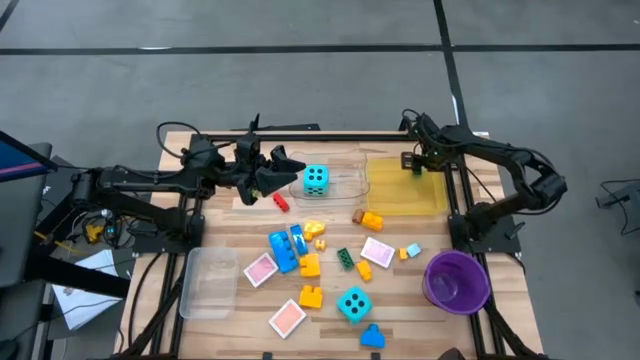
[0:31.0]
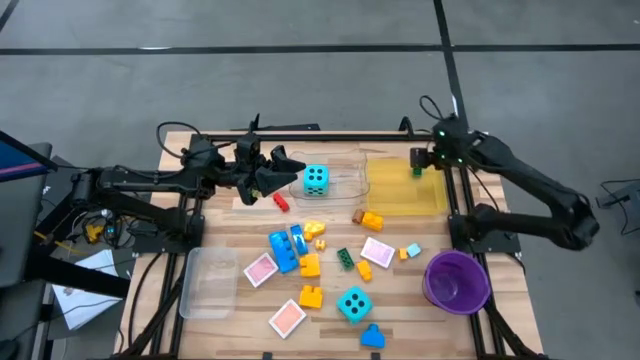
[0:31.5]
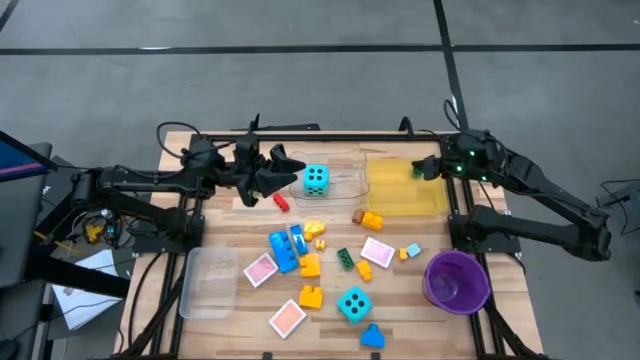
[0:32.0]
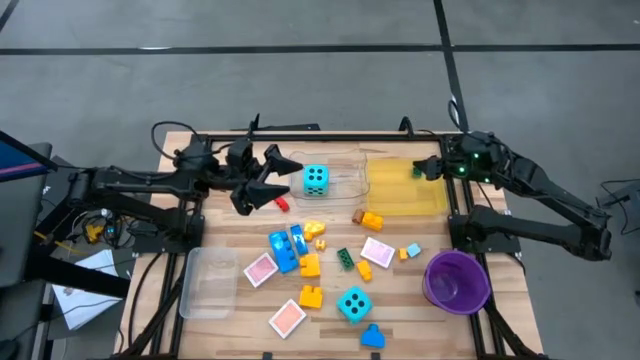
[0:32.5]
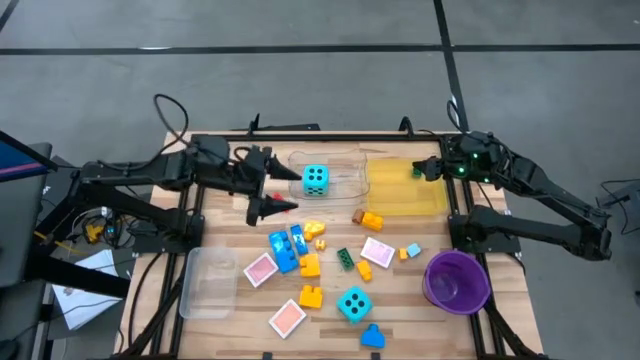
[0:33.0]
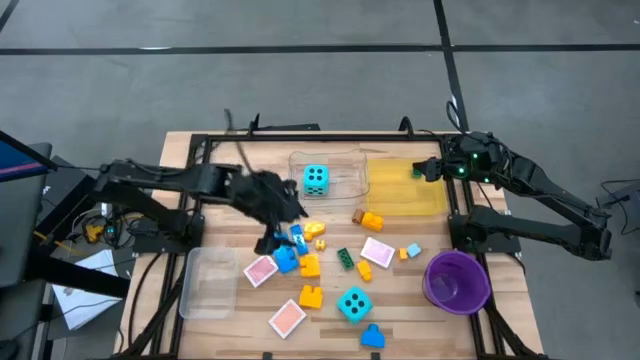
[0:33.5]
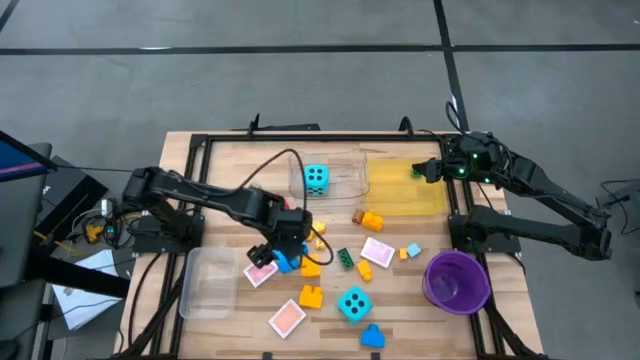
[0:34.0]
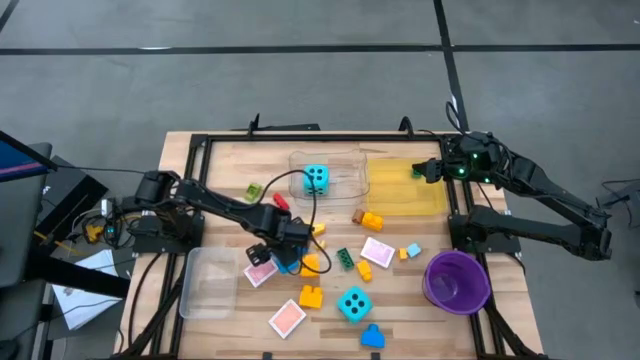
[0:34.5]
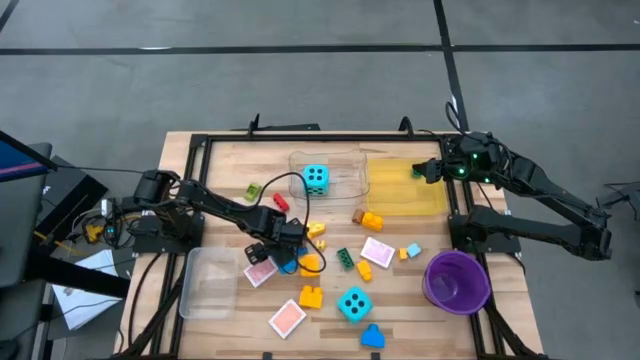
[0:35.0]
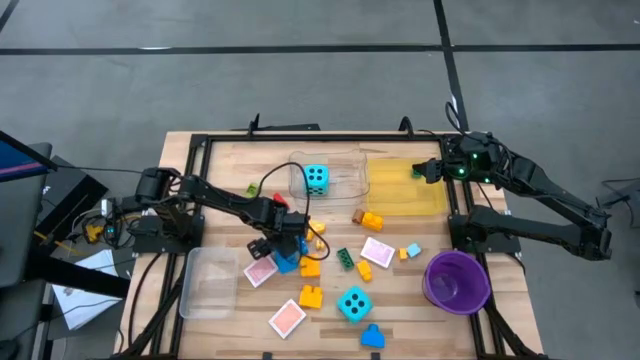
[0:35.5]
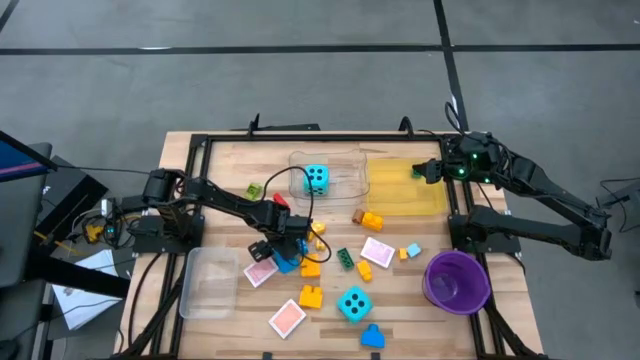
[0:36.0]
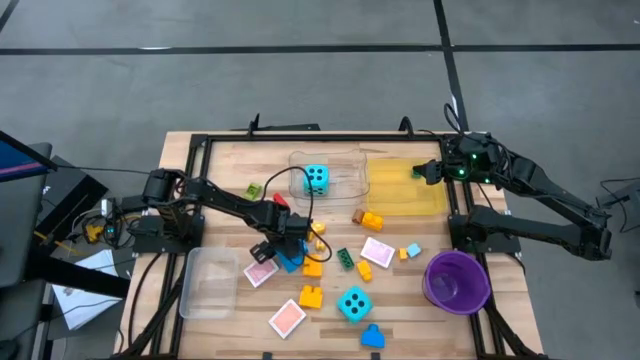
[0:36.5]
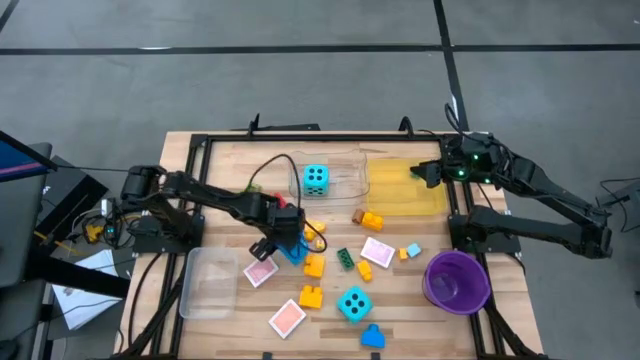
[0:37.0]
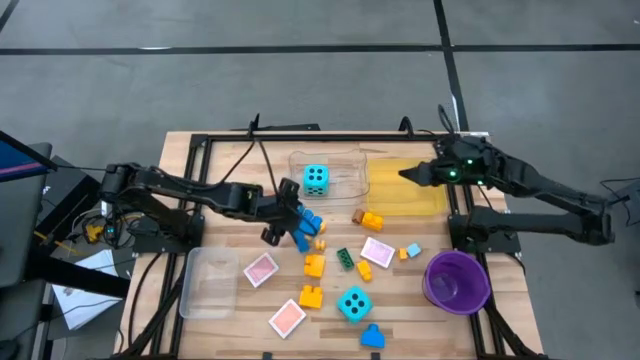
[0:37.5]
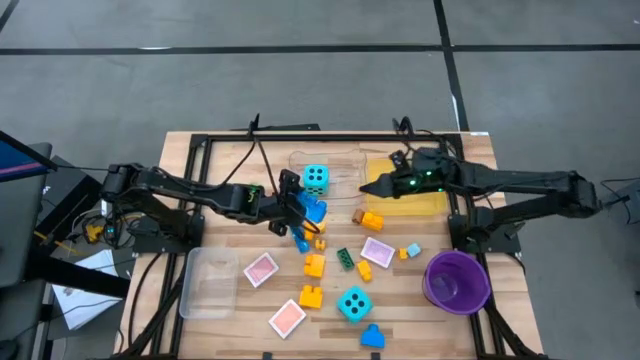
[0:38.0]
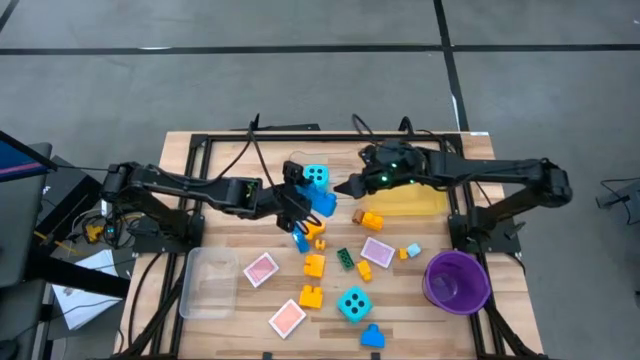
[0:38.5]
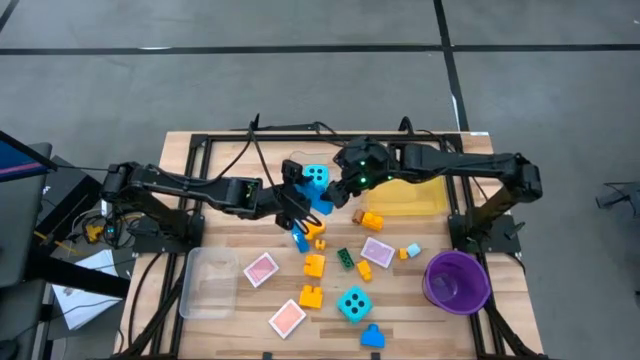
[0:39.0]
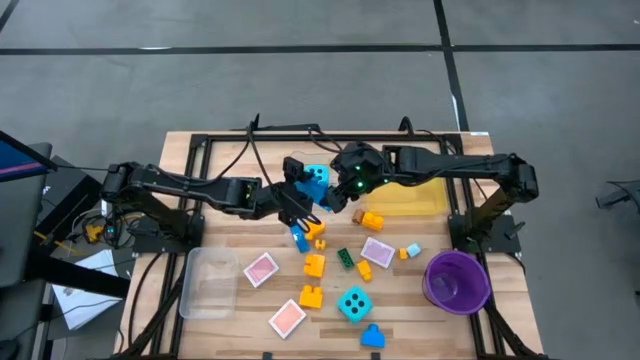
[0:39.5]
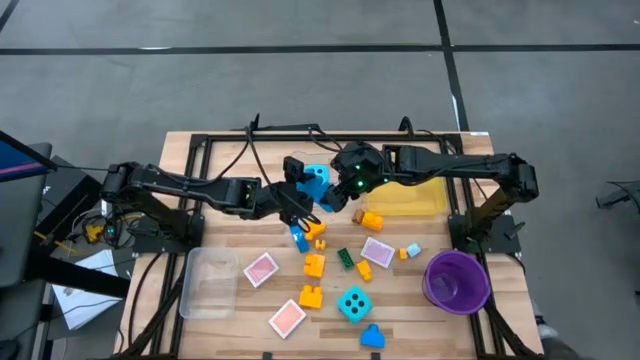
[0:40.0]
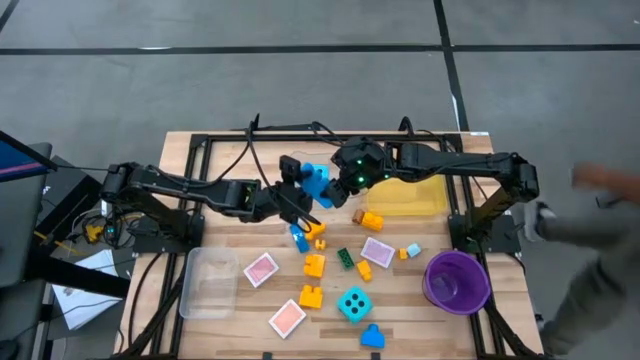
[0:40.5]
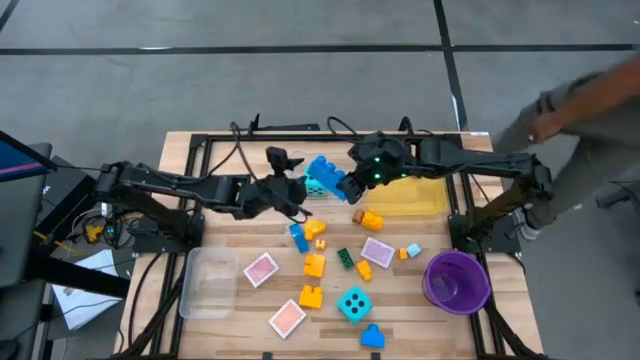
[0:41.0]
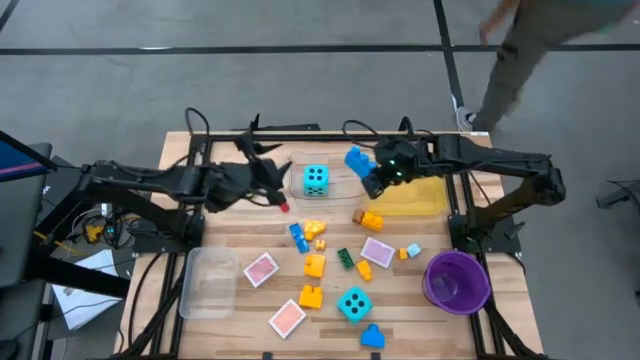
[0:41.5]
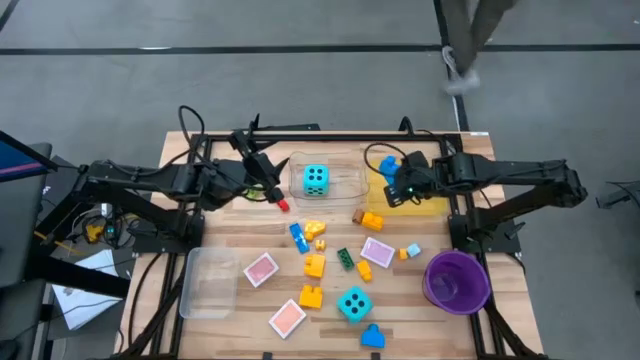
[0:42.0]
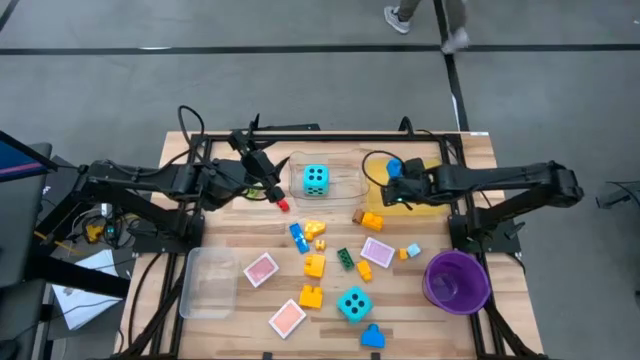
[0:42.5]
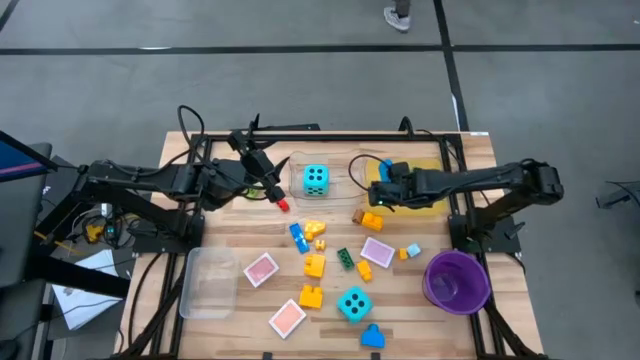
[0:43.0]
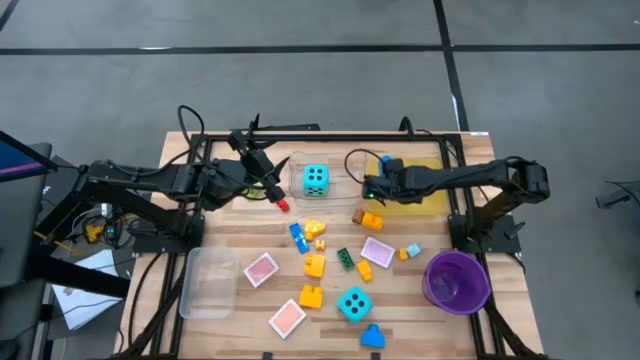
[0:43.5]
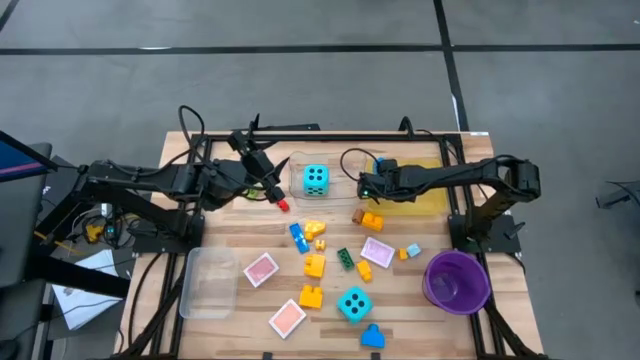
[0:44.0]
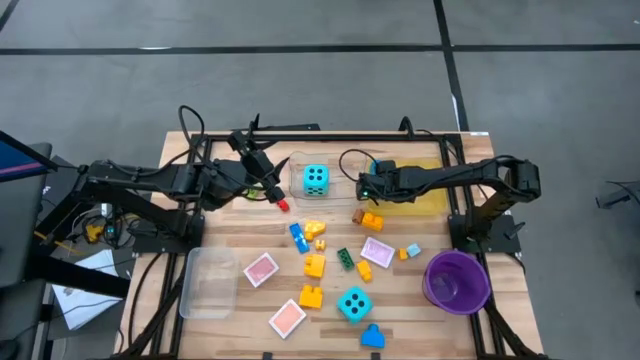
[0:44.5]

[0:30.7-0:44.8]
Task: Pick & Place Toys
Put the blue game piece into the yellow bin

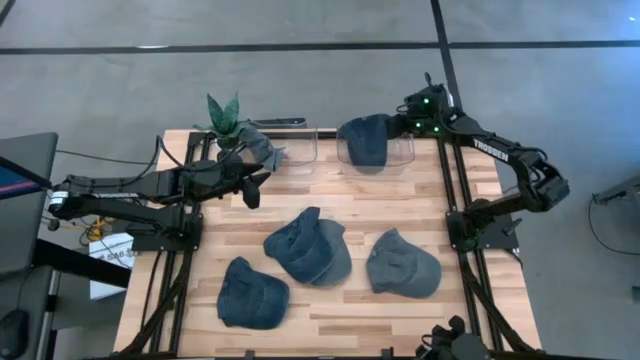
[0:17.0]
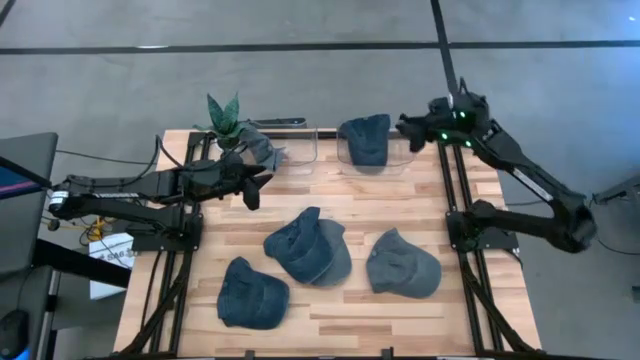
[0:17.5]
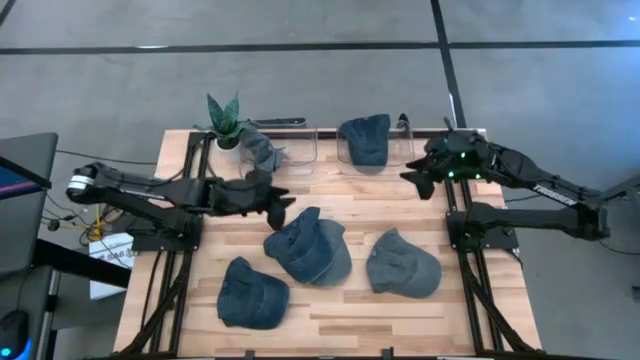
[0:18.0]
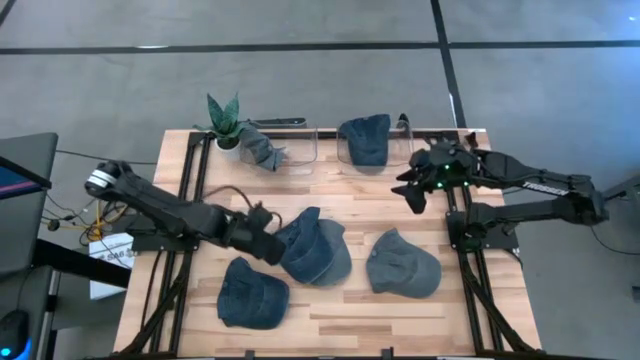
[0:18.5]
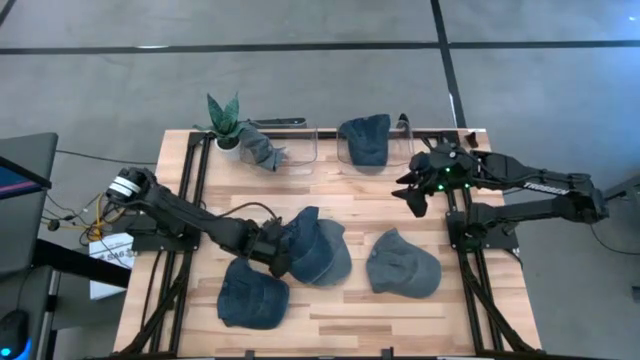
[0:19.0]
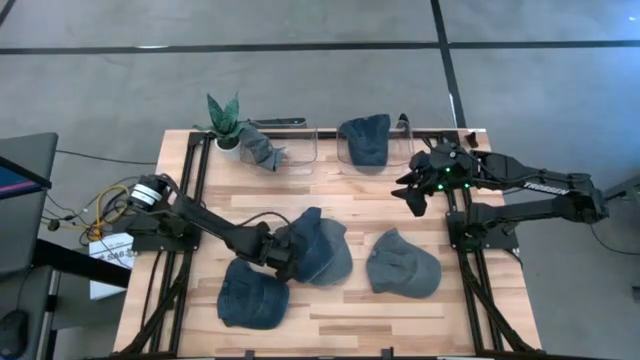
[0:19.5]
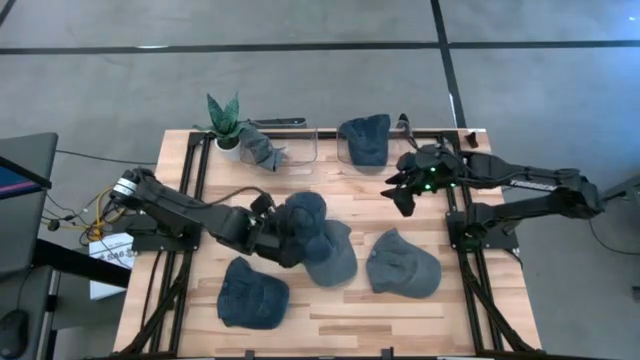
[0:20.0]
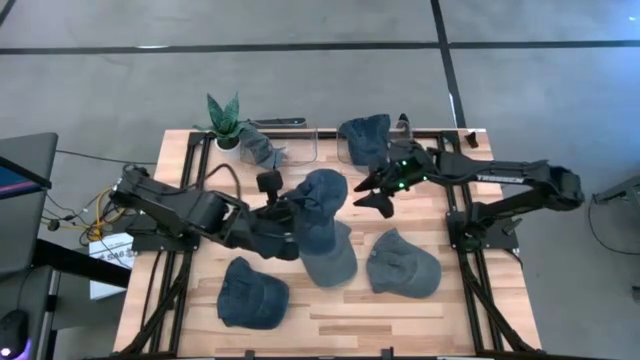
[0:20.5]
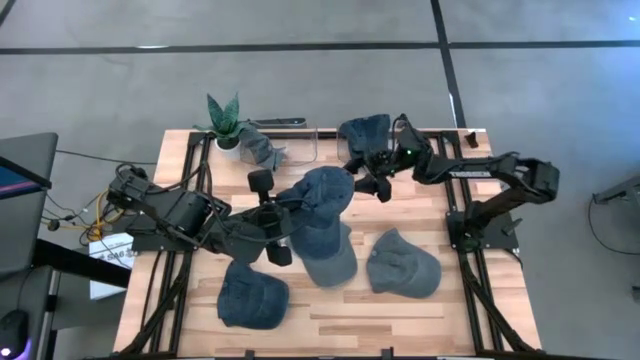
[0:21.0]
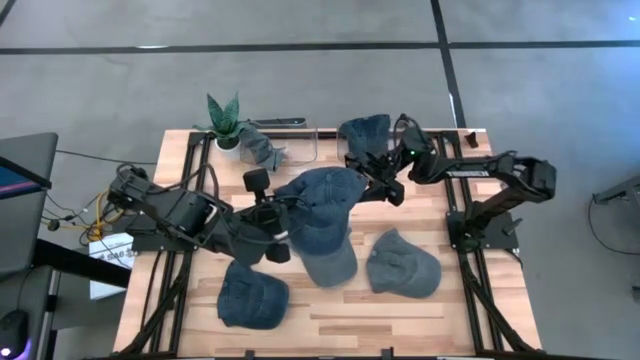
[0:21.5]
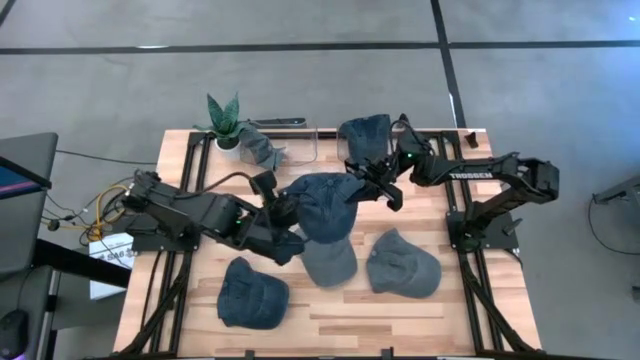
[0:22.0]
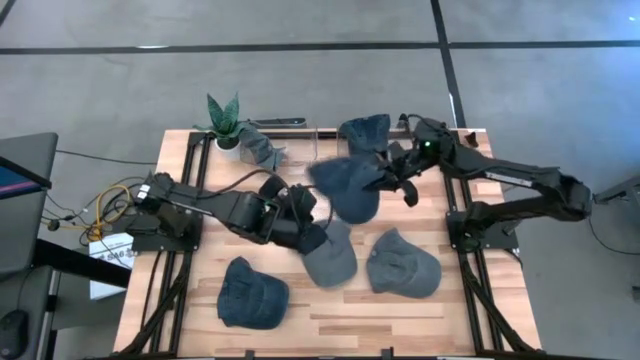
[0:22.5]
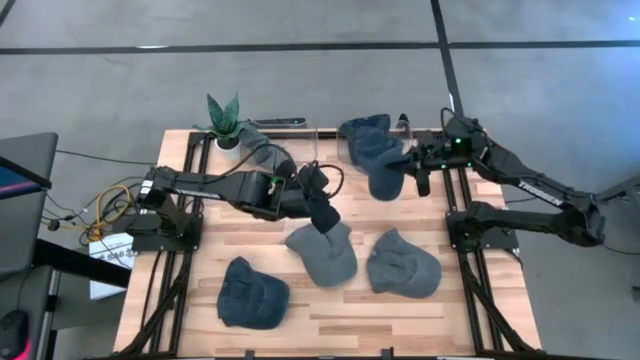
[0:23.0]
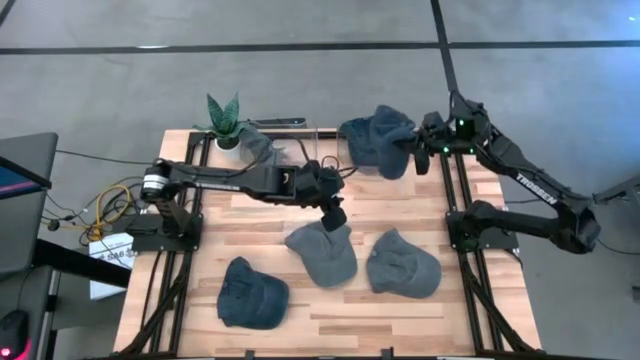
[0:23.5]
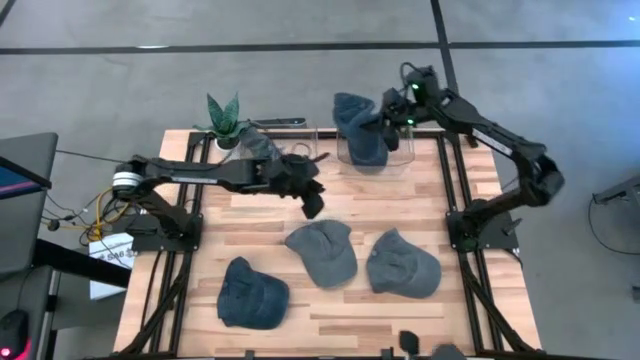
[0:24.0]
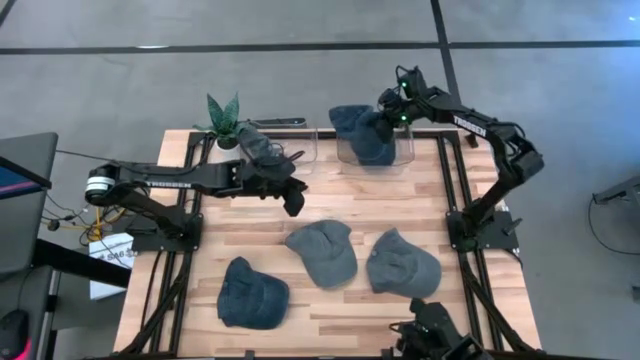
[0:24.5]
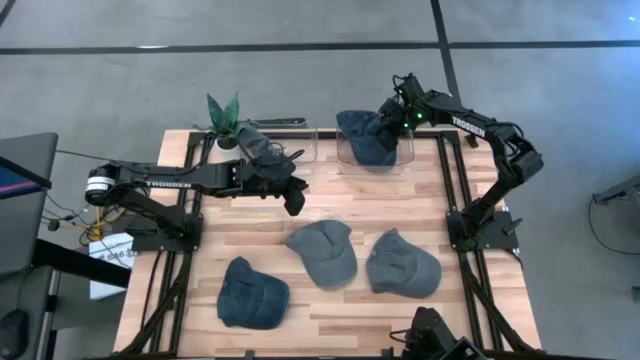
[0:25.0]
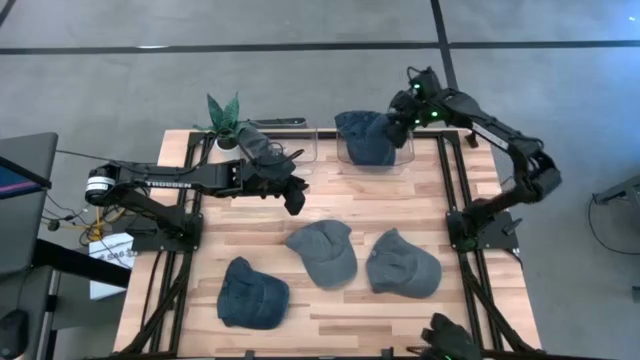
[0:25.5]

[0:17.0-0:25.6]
Task: Pick & Place hat
Put the top blue cap into the right transparent bin
